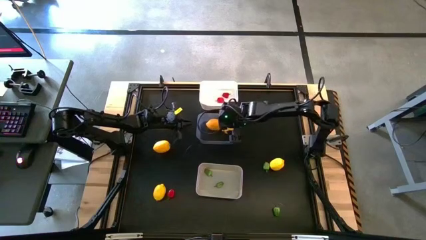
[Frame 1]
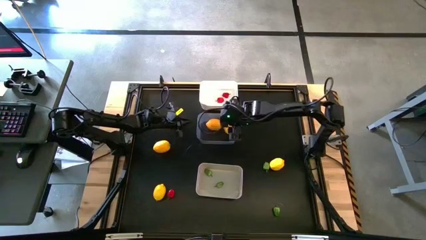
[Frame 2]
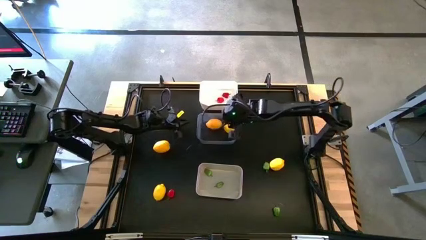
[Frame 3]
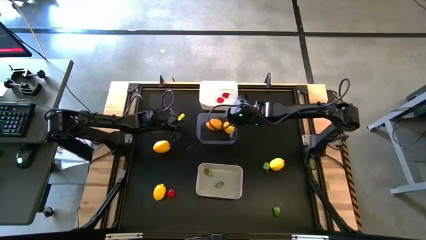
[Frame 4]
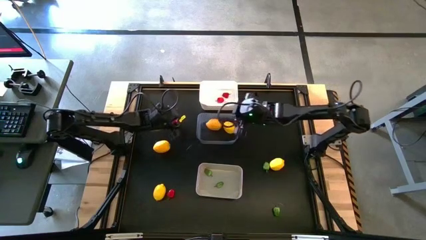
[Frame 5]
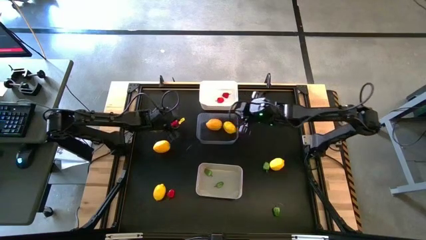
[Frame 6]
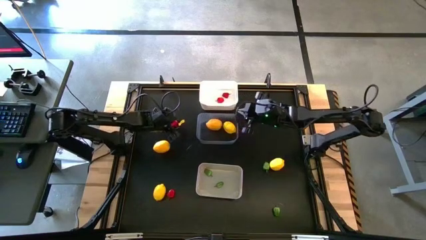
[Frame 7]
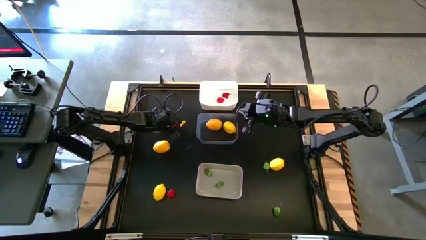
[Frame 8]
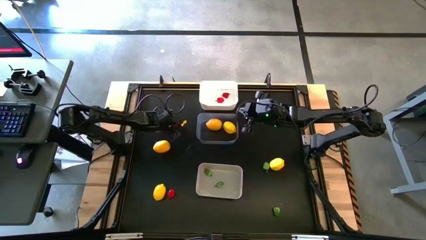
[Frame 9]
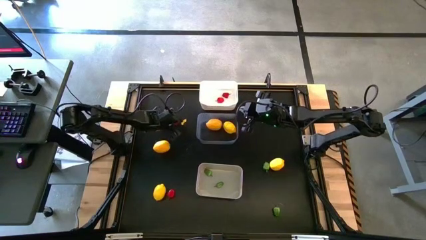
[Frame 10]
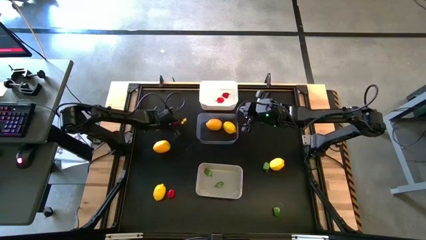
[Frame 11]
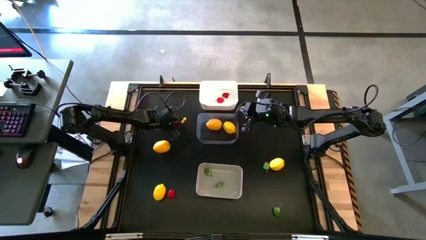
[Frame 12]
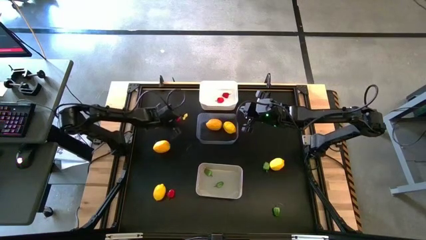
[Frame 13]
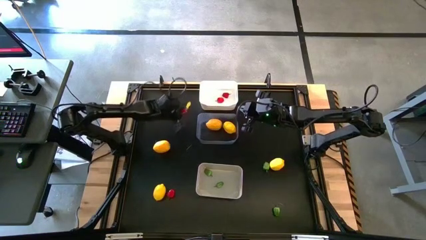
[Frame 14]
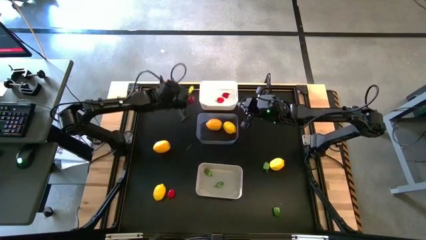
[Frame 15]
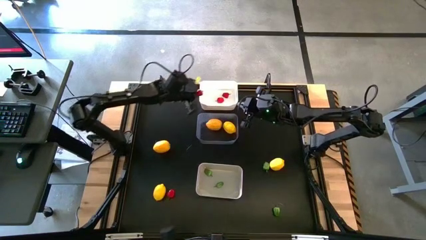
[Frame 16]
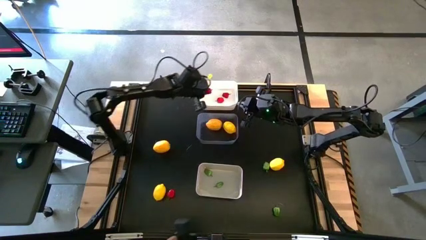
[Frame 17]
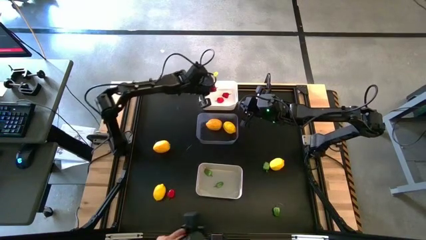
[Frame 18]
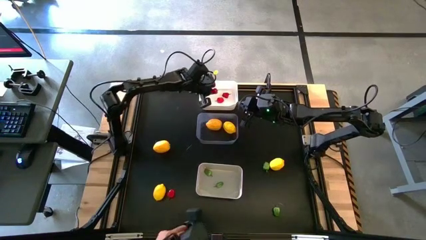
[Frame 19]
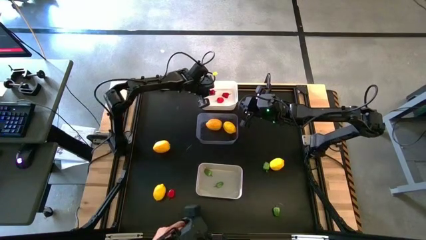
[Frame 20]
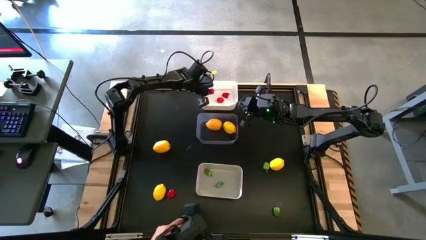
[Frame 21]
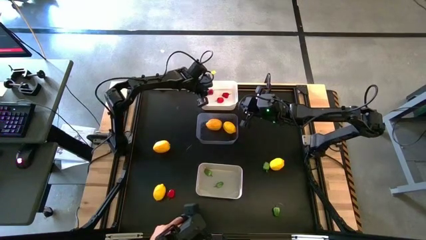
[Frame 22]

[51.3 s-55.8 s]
Task: Sort produce into baskets
Put the red chili pepper into the white bin

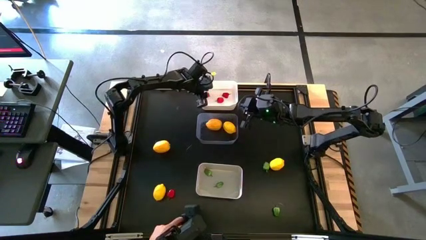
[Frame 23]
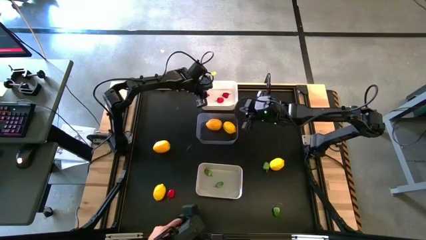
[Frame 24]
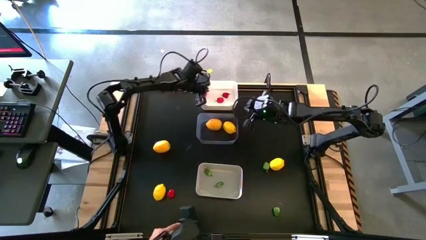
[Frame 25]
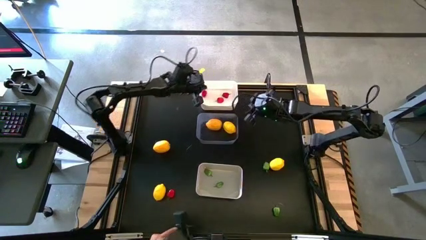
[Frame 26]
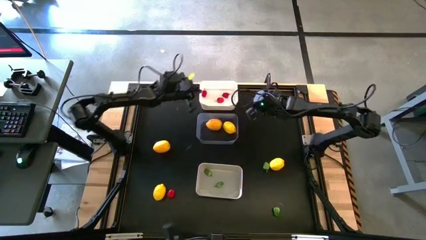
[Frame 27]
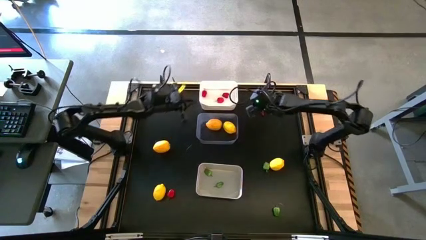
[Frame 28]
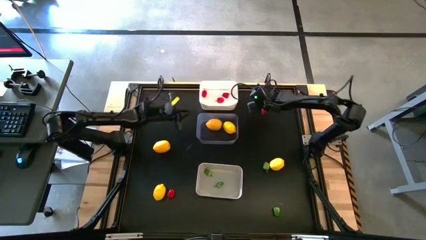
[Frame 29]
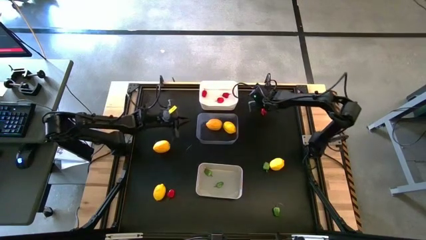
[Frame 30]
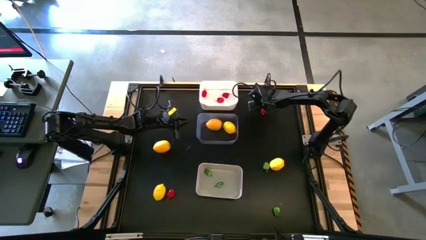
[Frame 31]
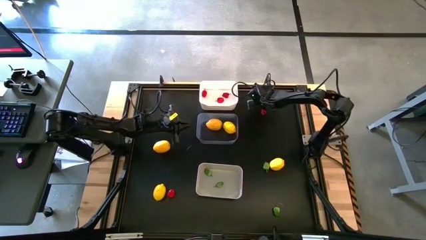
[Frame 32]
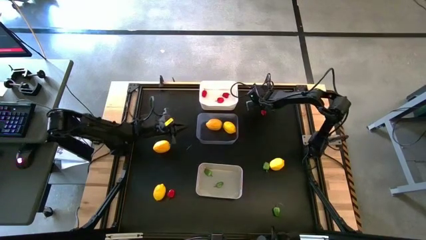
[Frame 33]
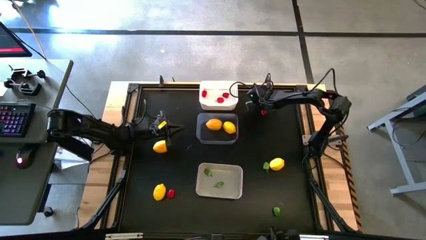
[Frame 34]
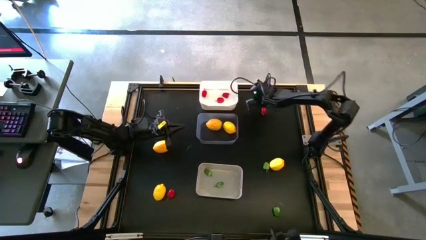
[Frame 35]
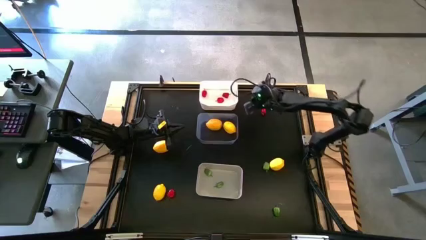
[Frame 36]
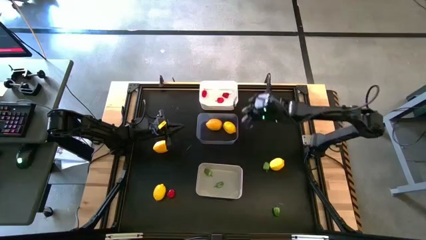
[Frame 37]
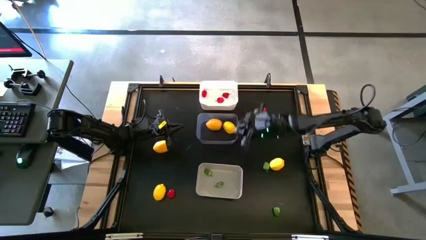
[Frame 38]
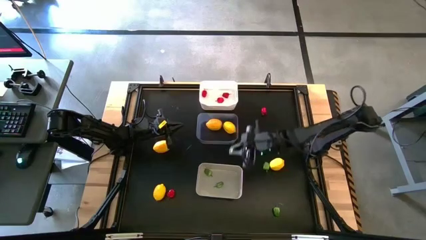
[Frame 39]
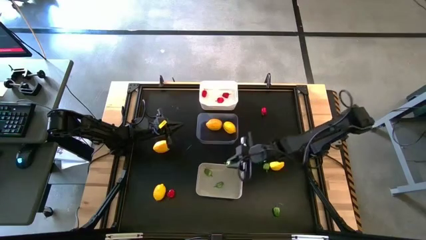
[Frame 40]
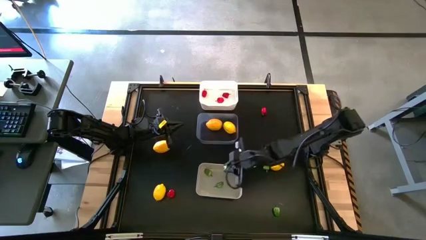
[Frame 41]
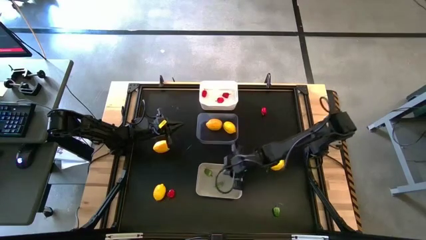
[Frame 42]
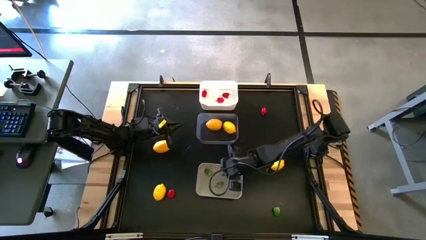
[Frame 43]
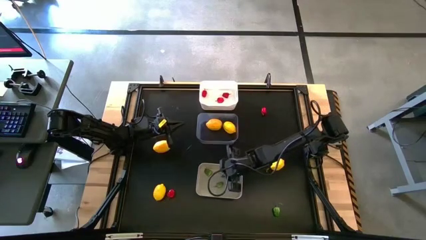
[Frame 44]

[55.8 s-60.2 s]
Put the green chili pepper into the gray bin

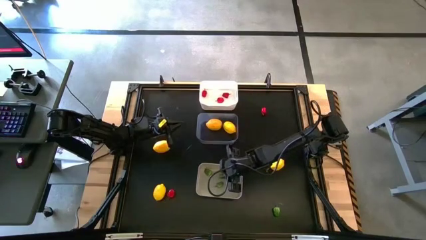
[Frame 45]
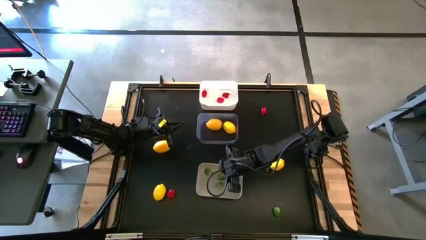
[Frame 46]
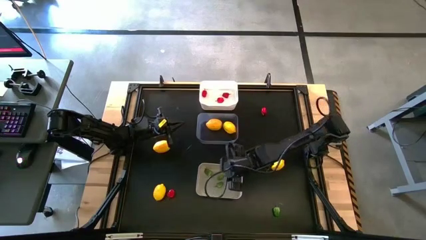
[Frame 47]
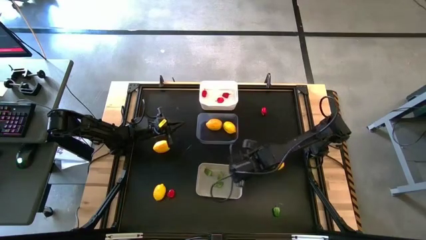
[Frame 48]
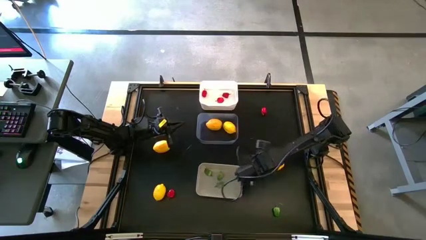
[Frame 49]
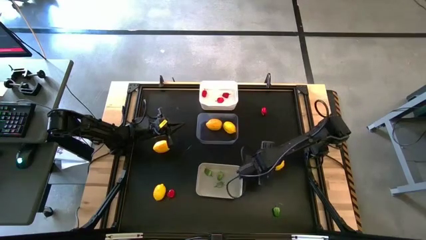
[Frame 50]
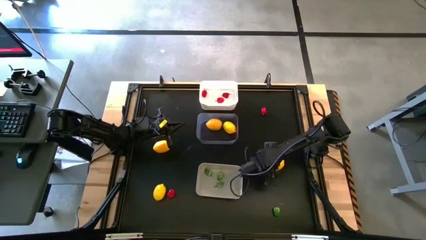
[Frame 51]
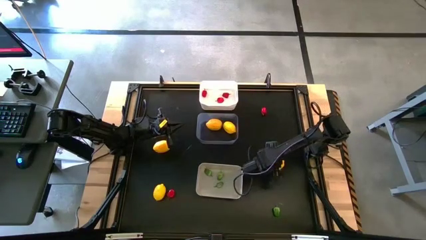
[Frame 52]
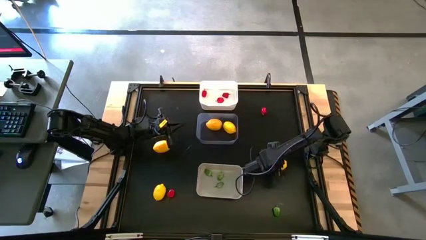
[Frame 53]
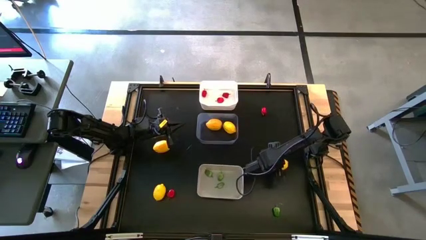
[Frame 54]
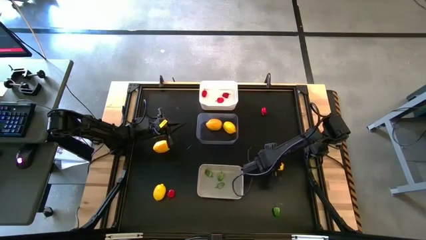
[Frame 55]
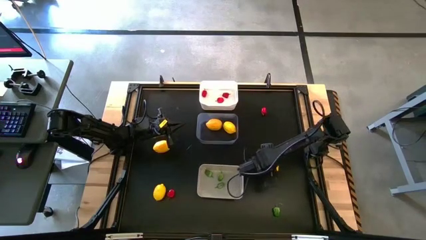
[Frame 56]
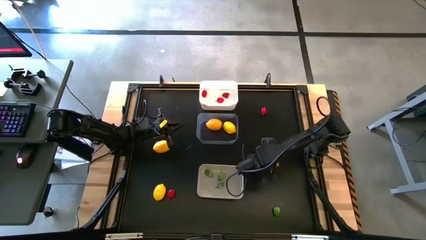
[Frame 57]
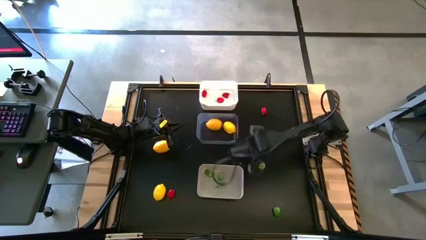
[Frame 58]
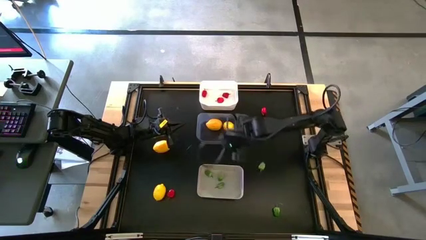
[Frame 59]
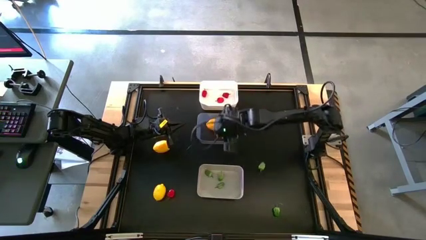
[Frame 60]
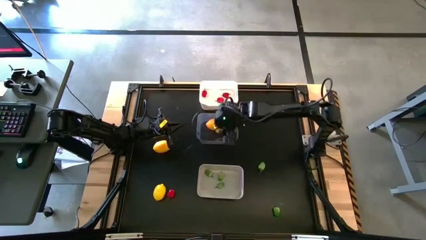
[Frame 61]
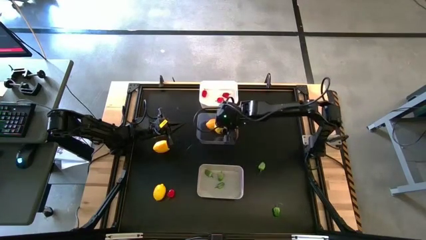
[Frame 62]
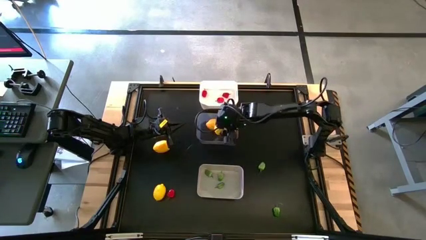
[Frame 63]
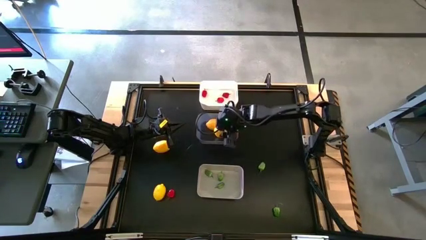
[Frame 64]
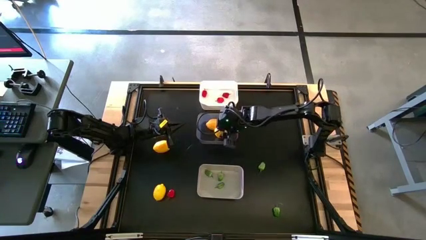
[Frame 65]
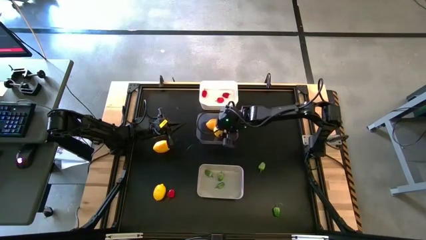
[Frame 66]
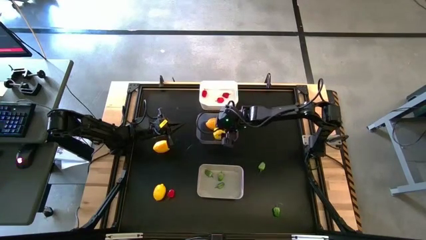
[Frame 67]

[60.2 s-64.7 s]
Put the yellow lemon into the transparent bin

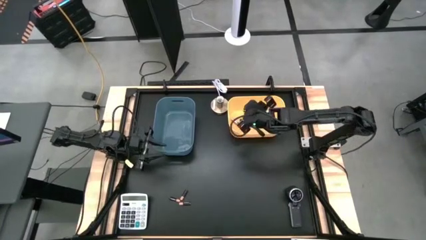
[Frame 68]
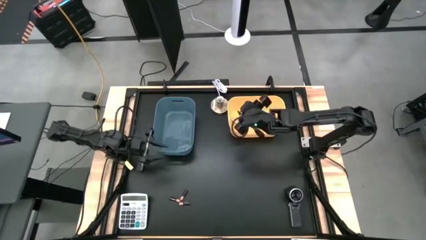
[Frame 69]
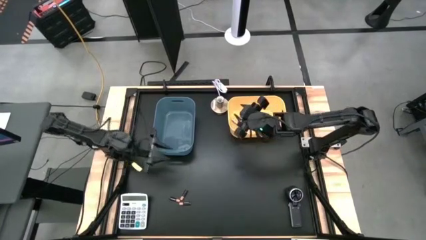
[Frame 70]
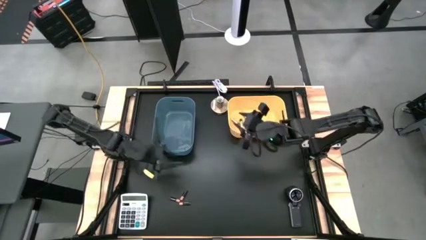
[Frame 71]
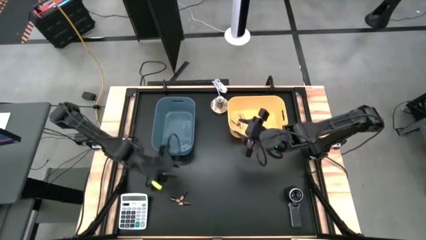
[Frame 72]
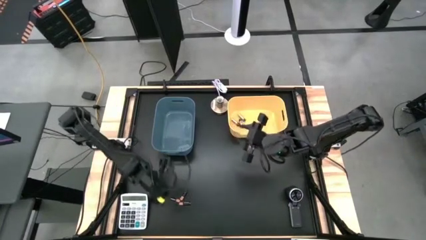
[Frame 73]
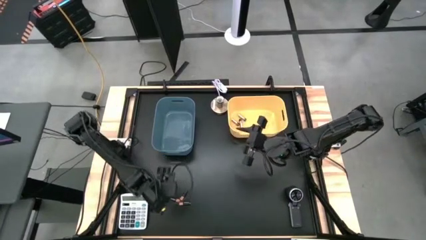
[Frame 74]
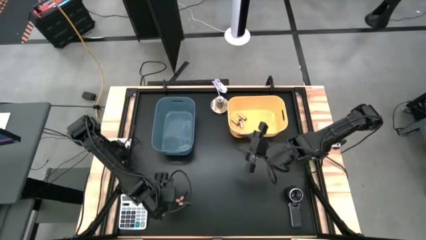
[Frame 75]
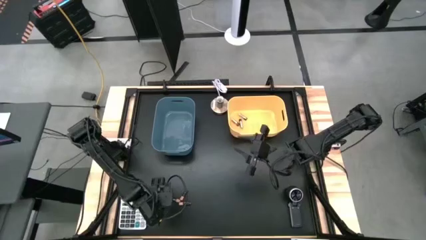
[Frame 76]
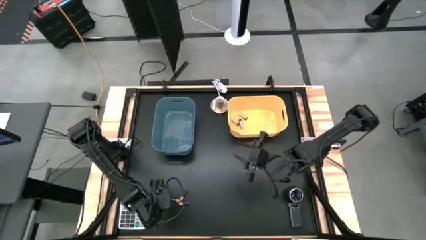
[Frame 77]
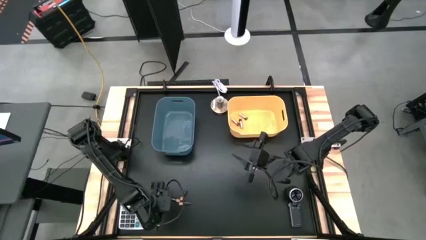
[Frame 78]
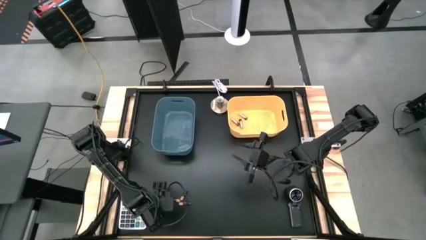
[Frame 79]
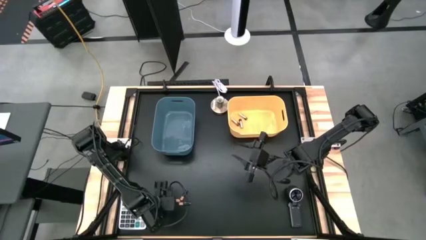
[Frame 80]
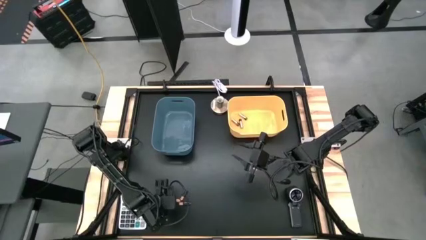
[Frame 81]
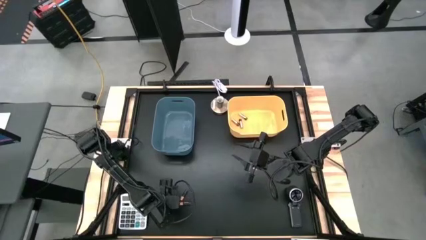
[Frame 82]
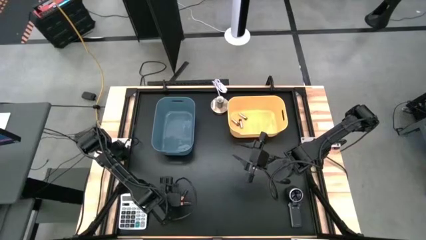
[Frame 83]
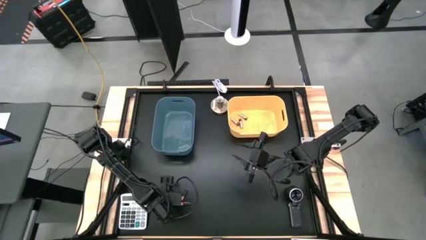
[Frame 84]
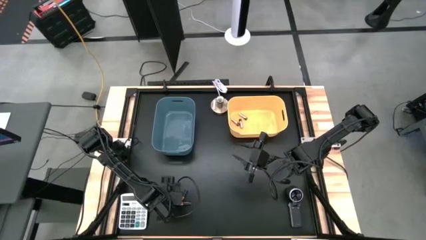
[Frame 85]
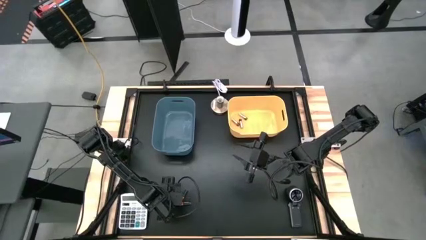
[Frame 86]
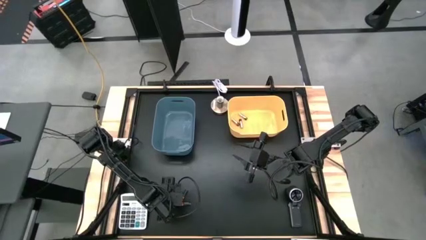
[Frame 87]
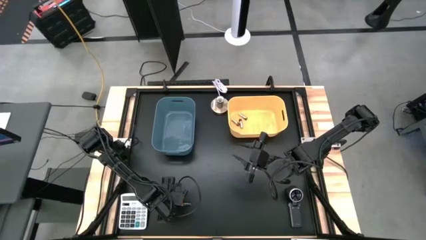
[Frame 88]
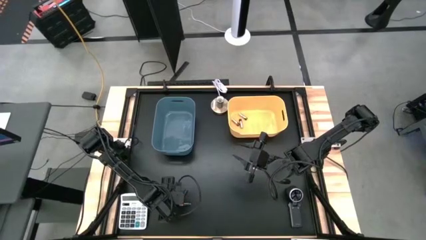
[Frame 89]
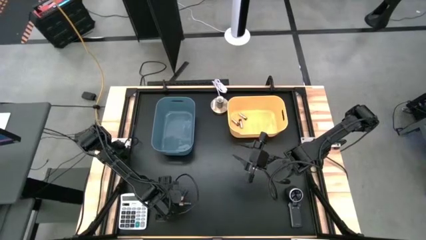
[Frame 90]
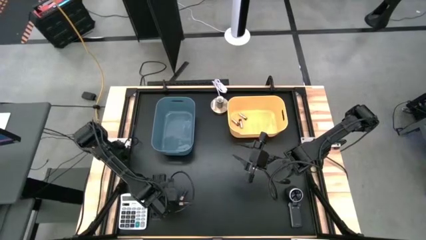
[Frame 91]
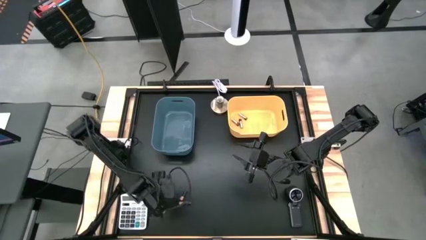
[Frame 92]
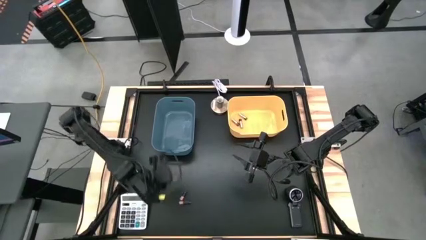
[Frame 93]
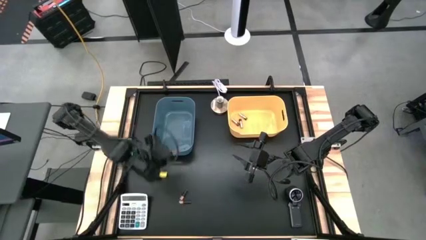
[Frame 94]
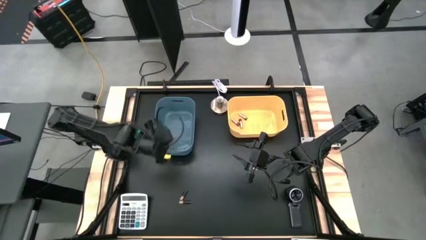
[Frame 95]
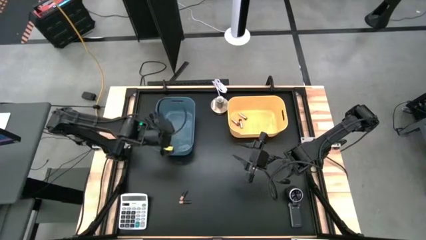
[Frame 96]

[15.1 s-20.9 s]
Task: Sort batteries
Put the middle left black battery into the blue bin
